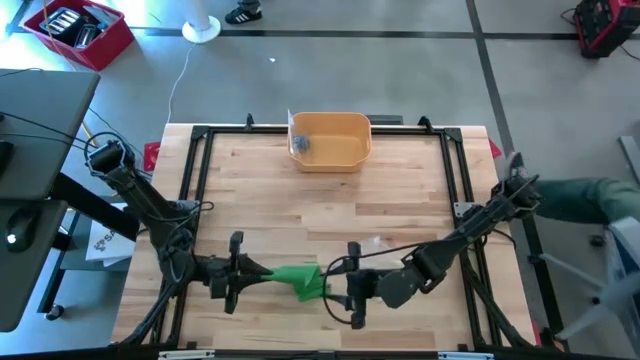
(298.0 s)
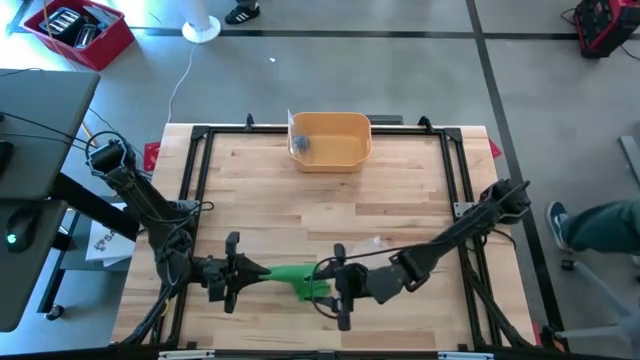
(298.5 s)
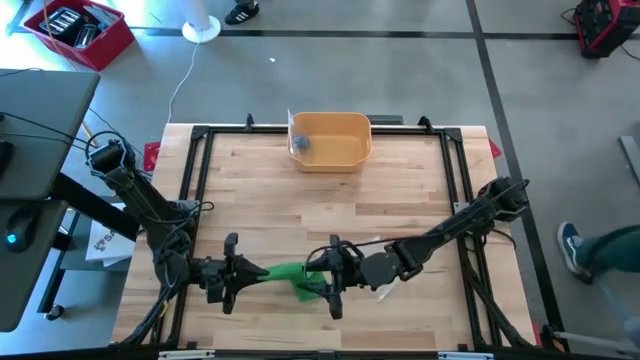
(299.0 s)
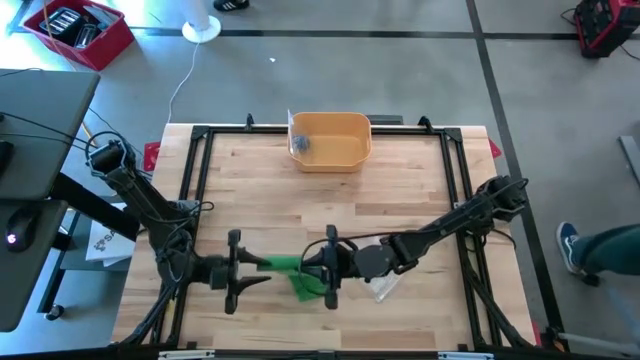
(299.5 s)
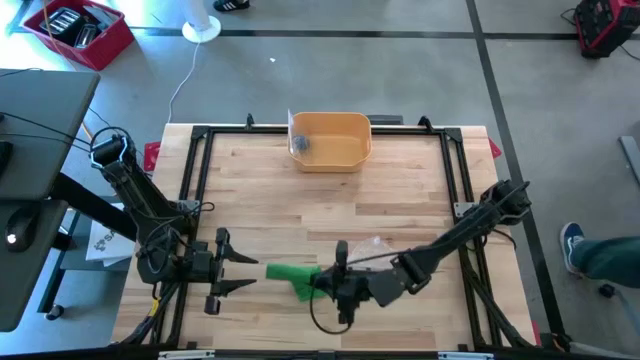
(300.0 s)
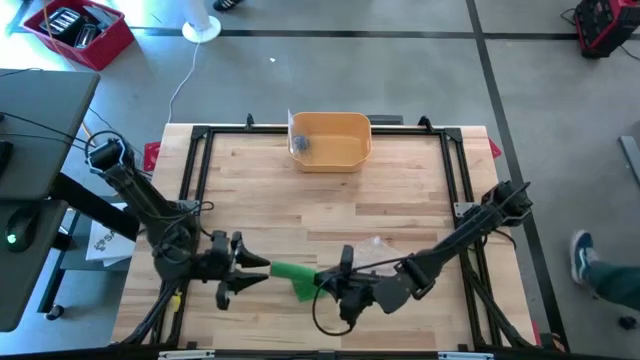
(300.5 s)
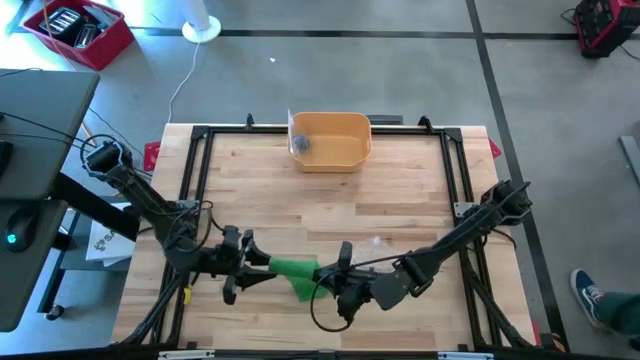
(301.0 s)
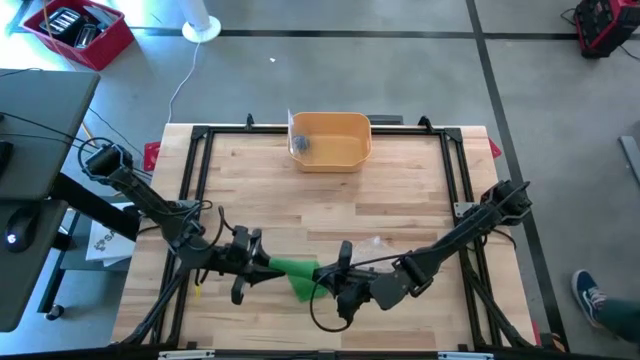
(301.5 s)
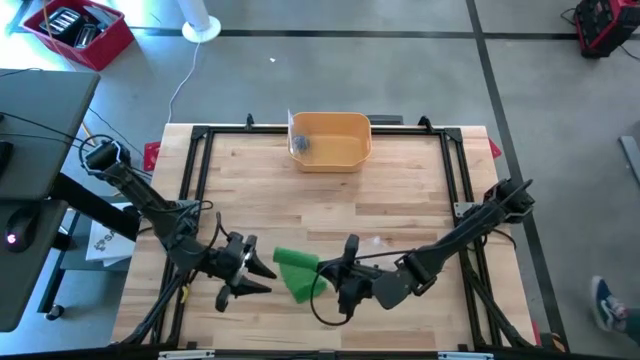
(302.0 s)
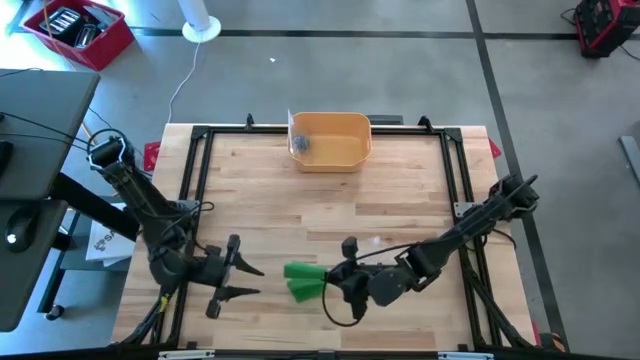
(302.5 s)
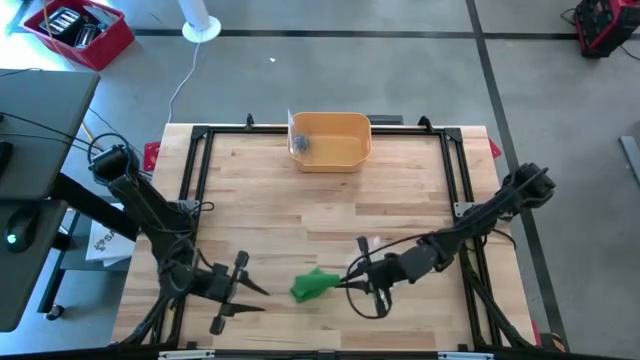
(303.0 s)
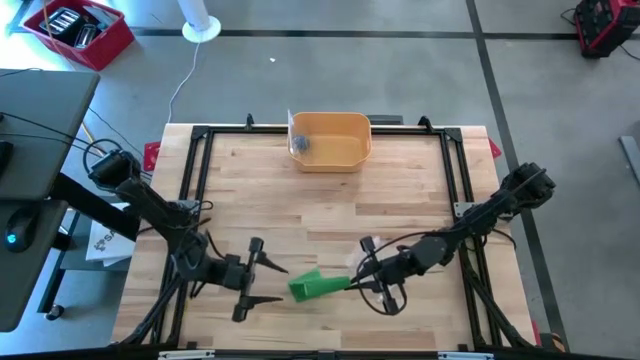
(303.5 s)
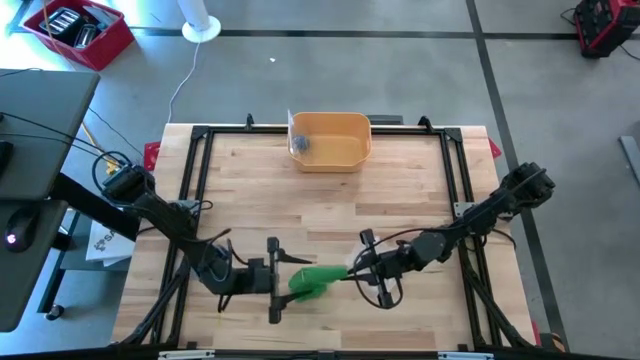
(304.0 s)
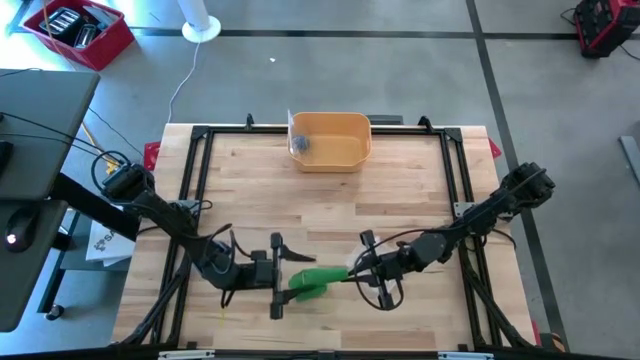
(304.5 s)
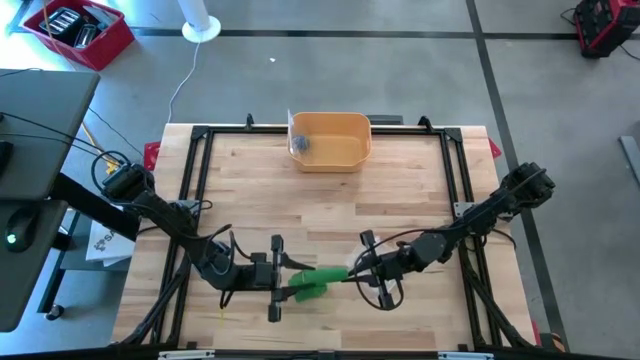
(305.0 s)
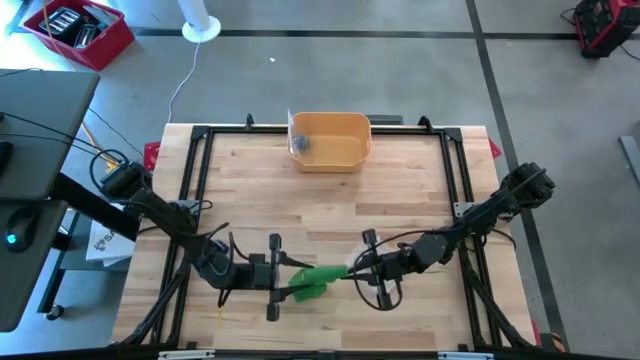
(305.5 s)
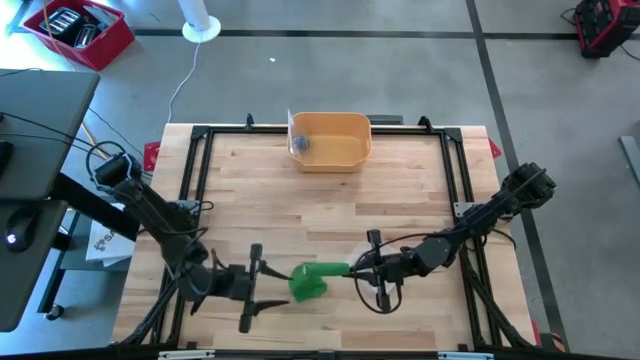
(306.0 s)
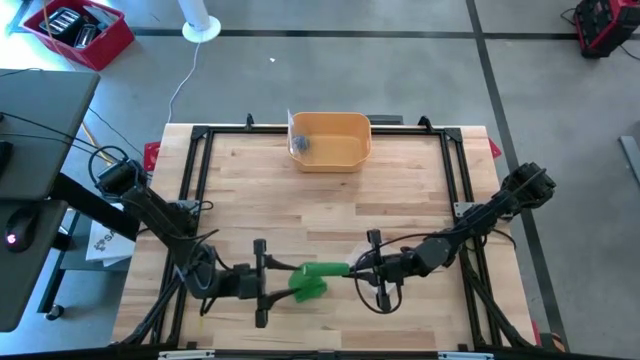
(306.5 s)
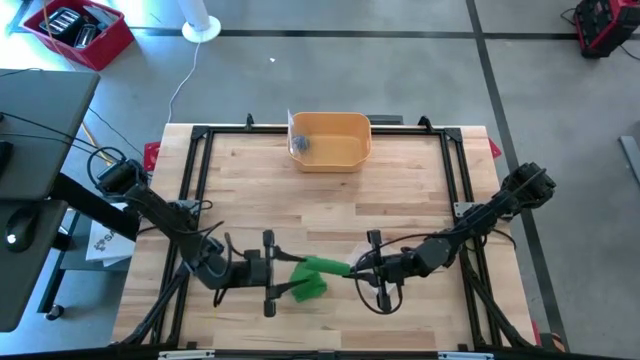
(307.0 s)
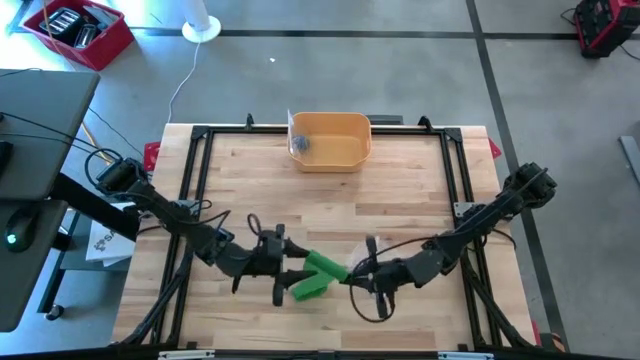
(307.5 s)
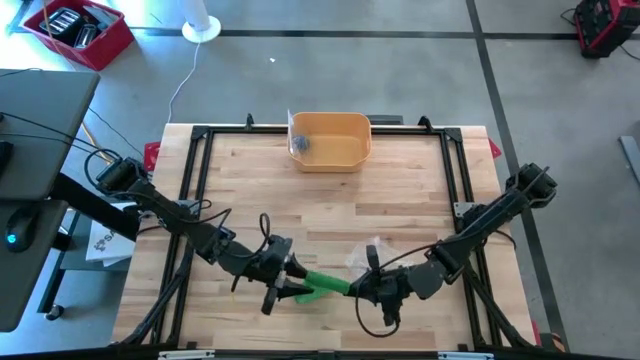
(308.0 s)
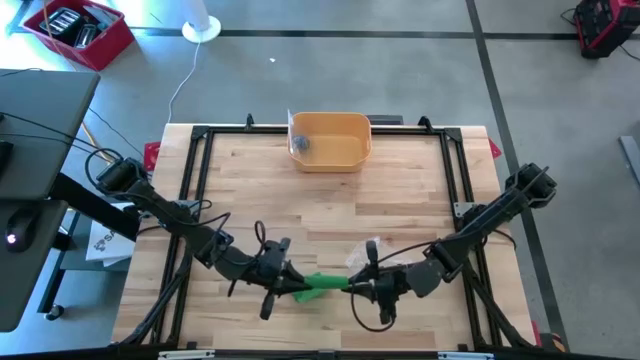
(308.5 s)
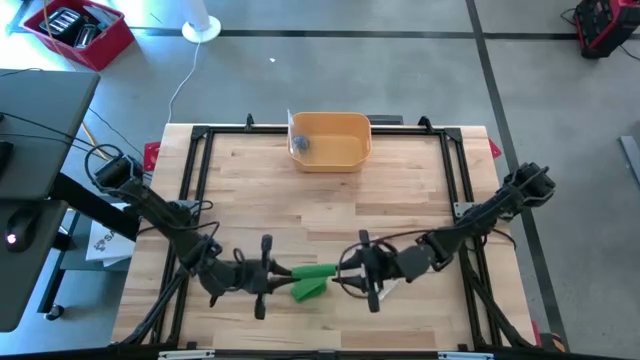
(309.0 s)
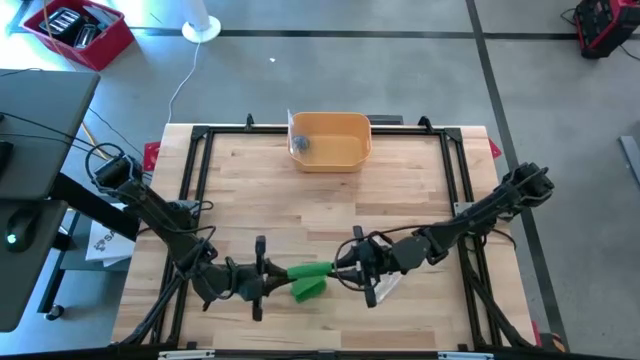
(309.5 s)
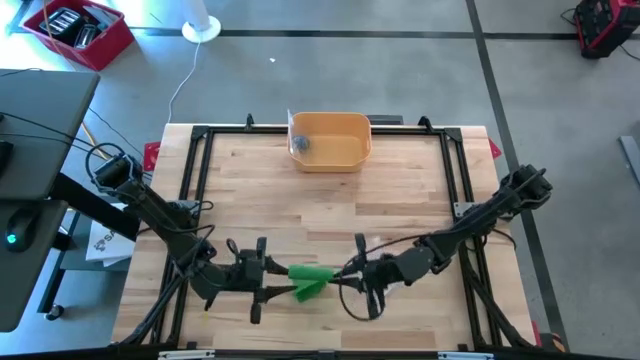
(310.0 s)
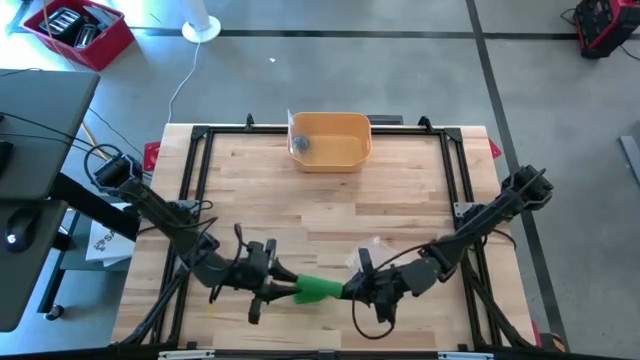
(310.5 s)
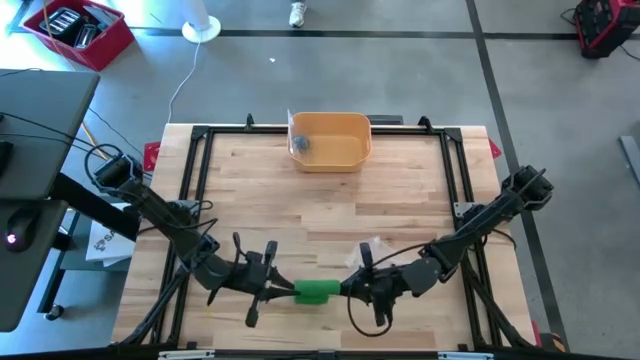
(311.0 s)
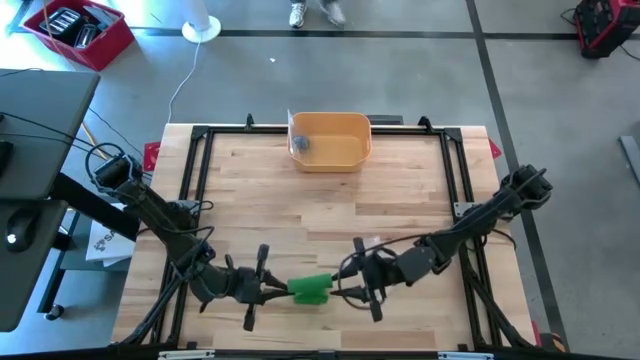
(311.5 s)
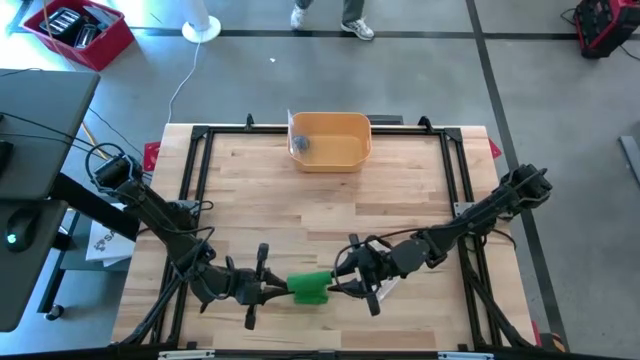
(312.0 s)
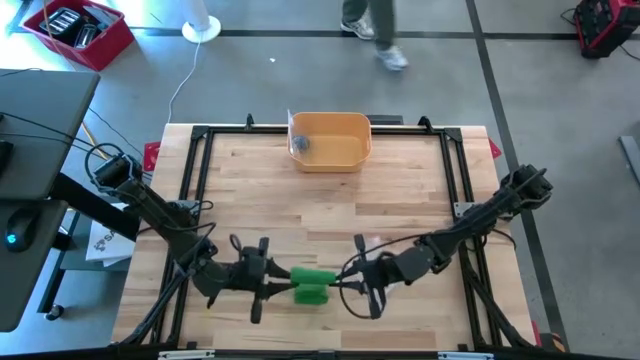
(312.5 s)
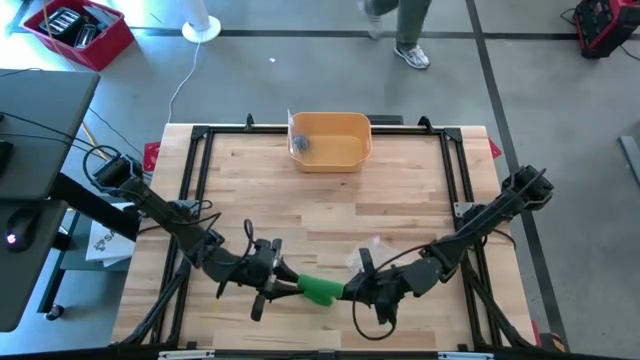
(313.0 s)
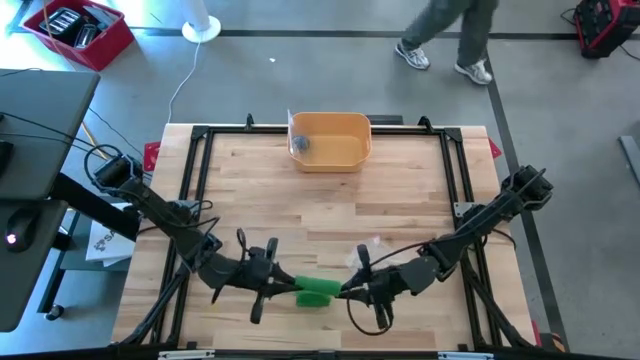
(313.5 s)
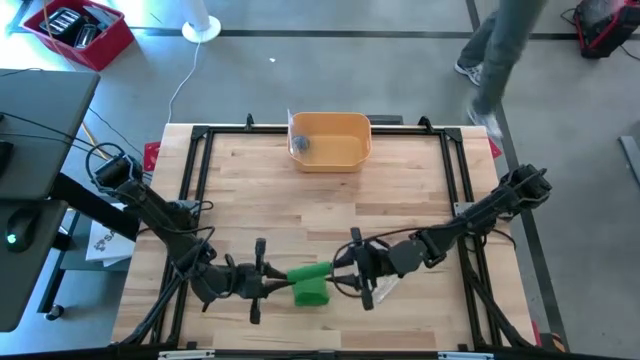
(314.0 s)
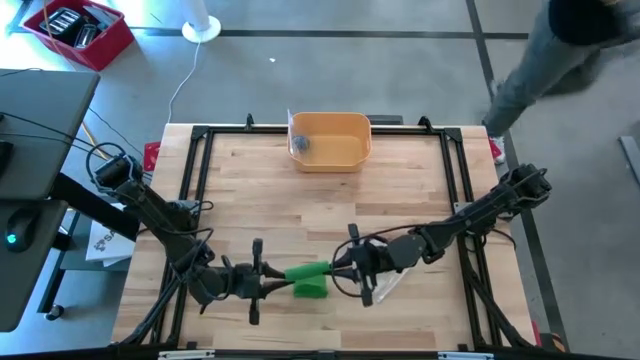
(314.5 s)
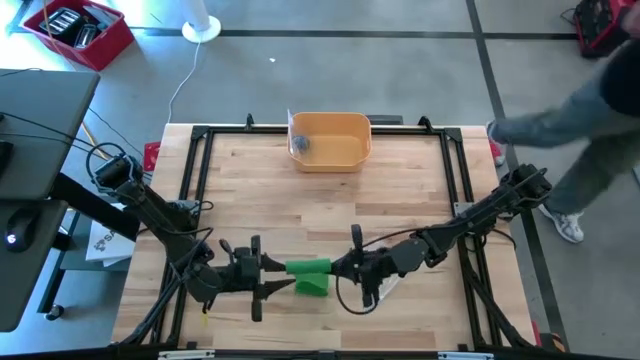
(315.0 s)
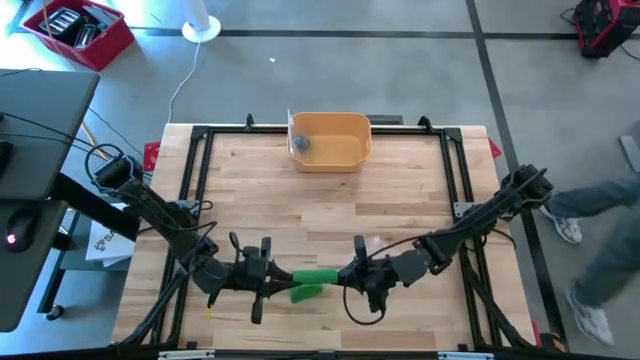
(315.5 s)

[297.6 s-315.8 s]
Task: Roll bandage
Roll the green bandage

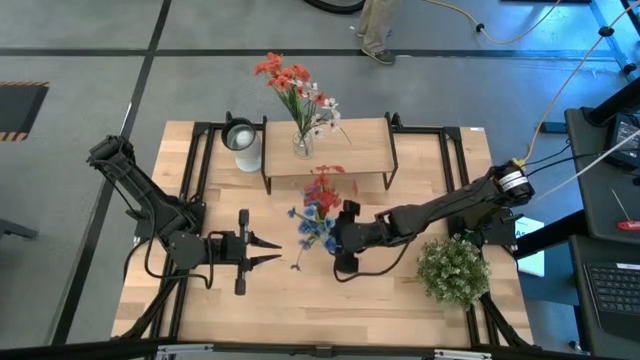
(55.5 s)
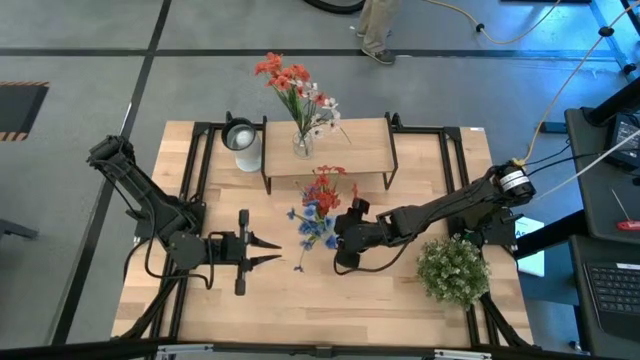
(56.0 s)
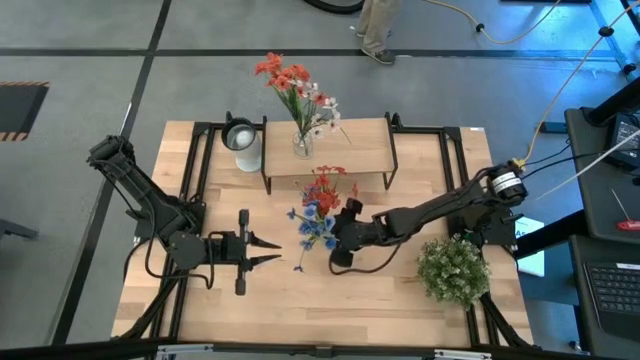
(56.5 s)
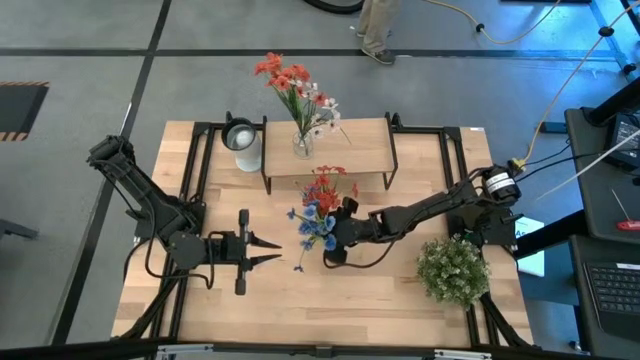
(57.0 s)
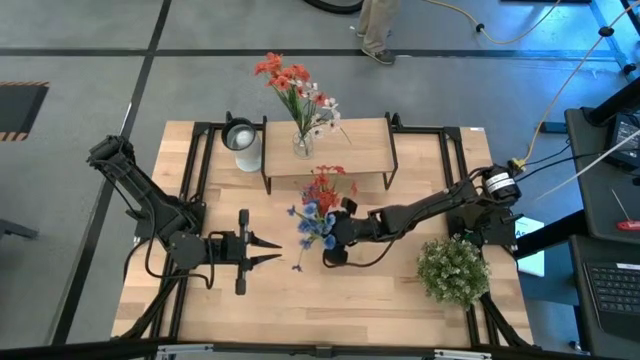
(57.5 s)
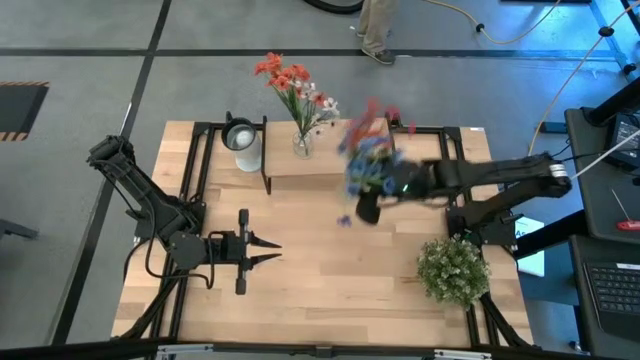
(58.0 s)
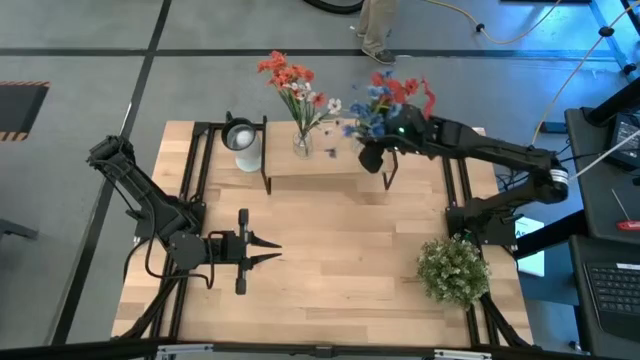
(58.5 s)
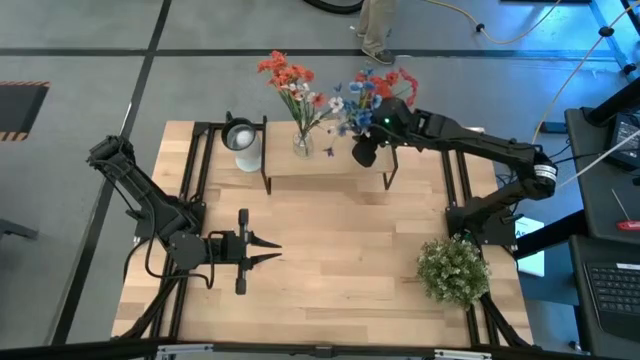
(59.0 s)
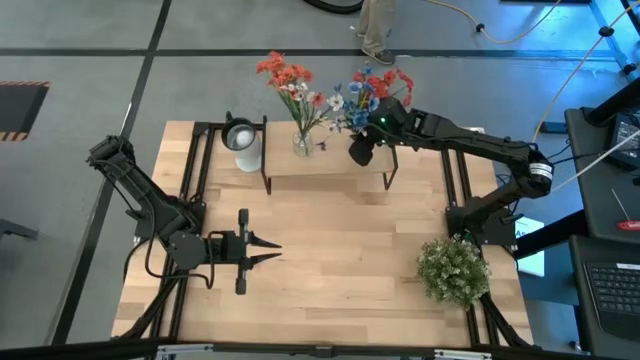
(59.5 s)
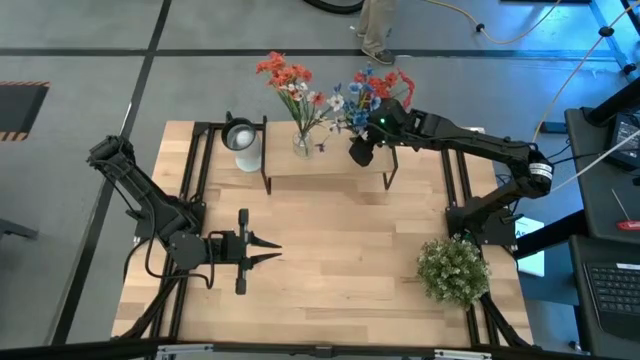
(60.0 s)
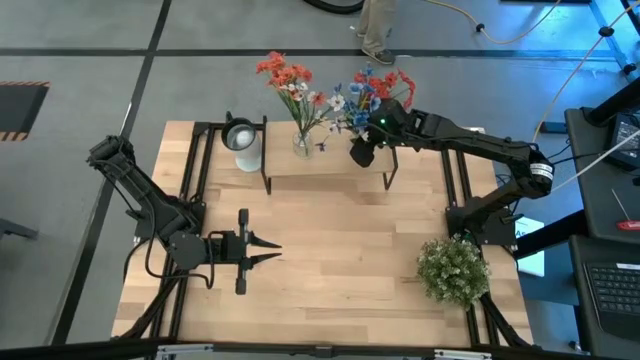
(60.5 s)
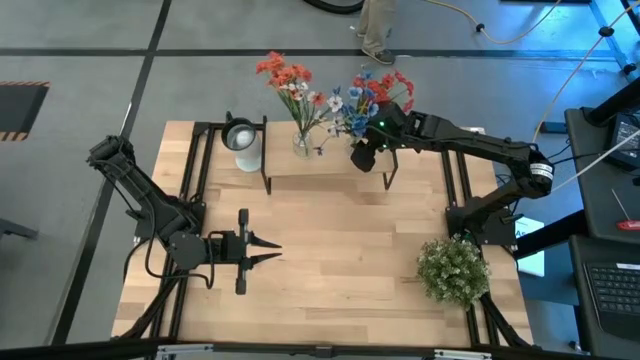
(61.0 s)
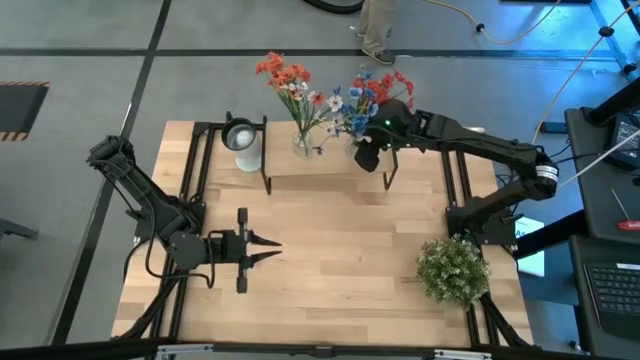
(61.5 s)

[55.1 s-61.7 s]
Task: Pick and place flowers into a vace then onto a shelf
Put the transparent vase with flowers on the shelf
